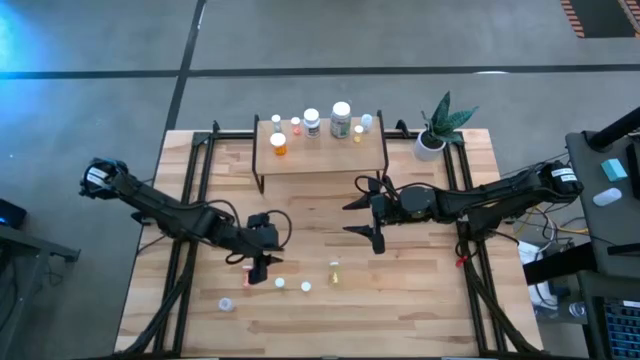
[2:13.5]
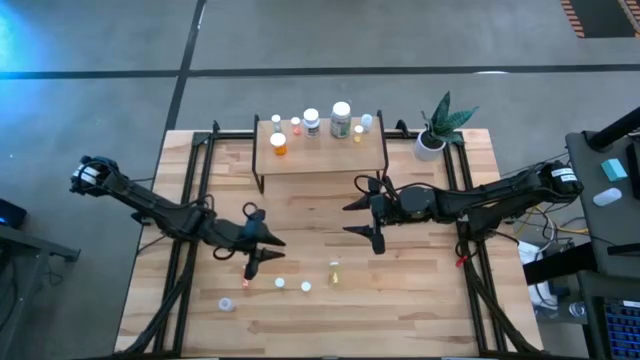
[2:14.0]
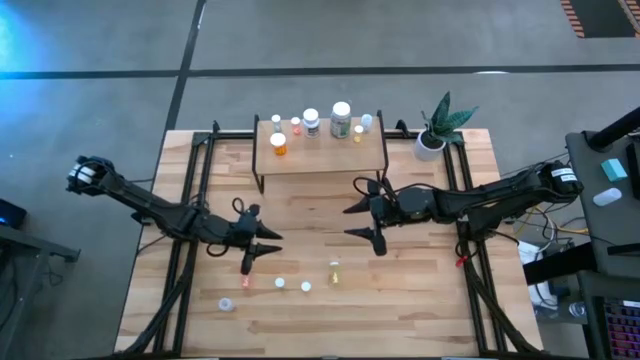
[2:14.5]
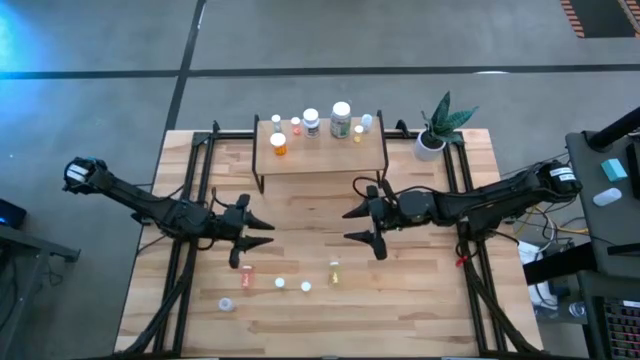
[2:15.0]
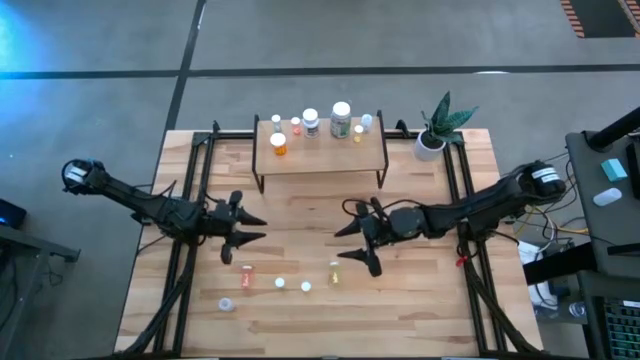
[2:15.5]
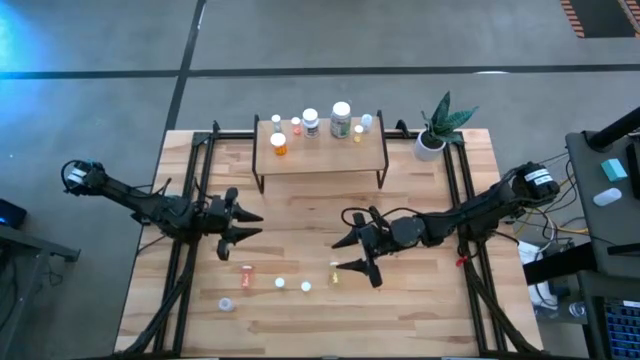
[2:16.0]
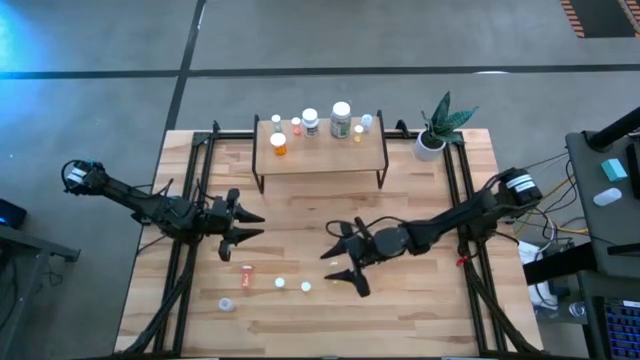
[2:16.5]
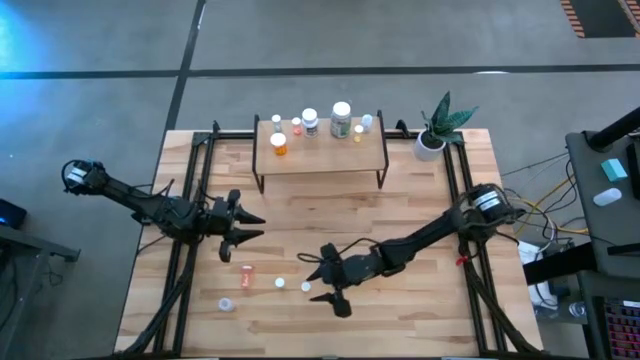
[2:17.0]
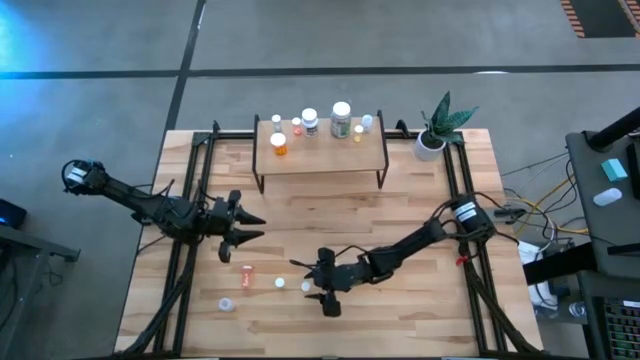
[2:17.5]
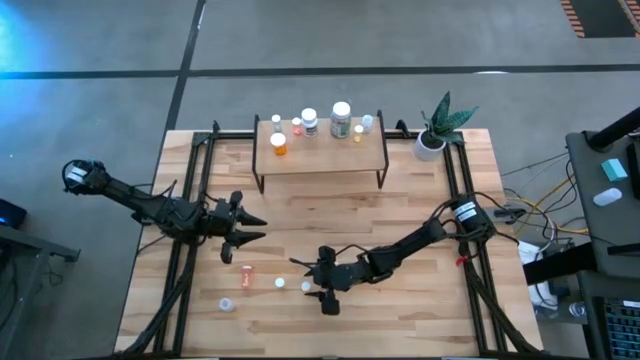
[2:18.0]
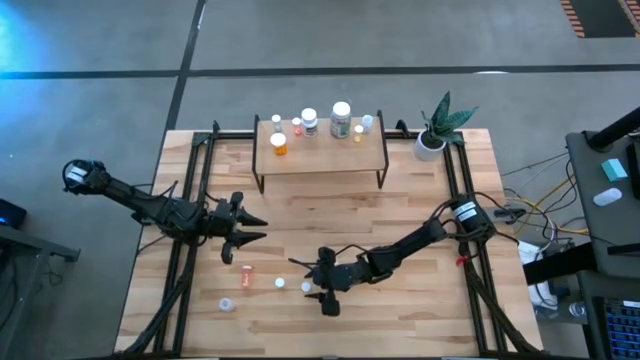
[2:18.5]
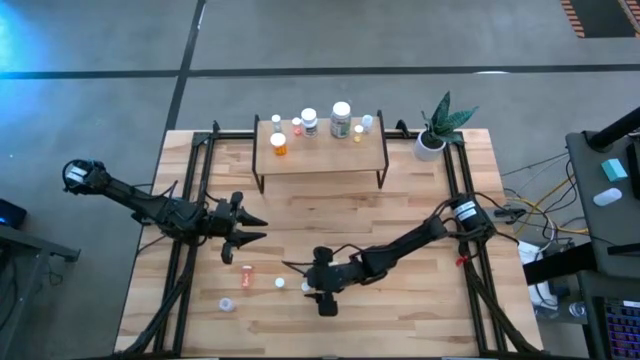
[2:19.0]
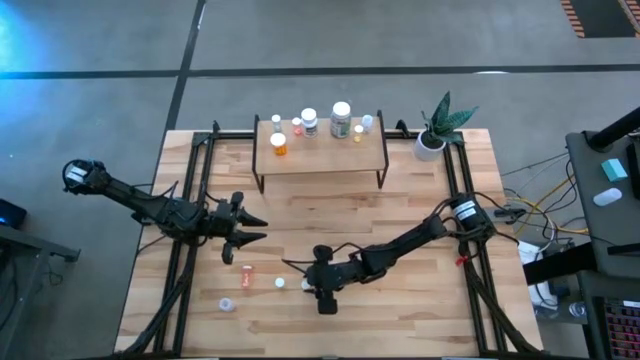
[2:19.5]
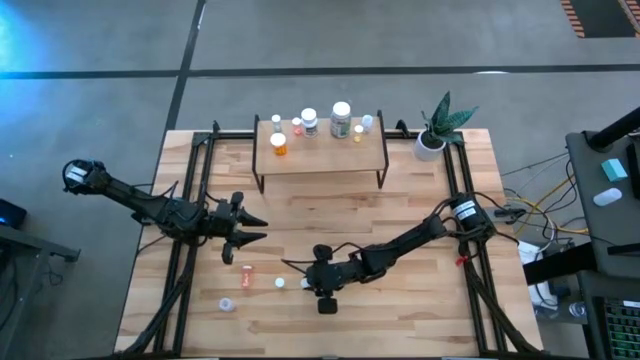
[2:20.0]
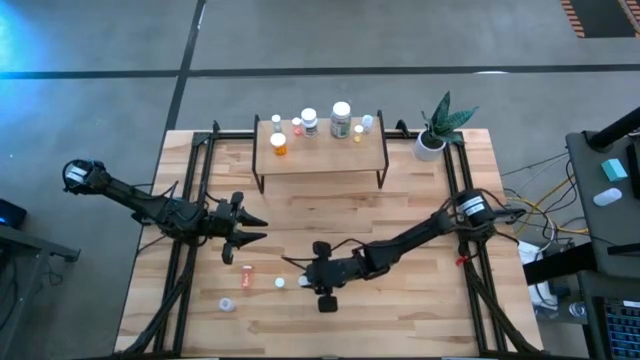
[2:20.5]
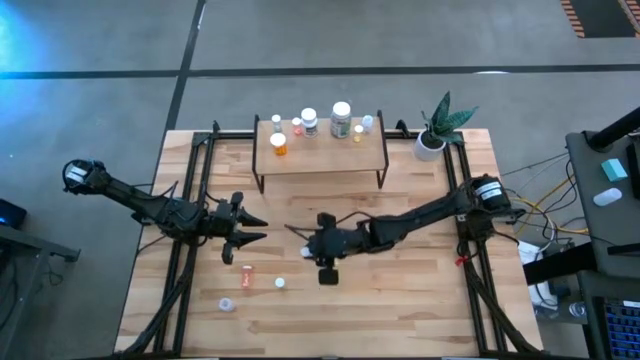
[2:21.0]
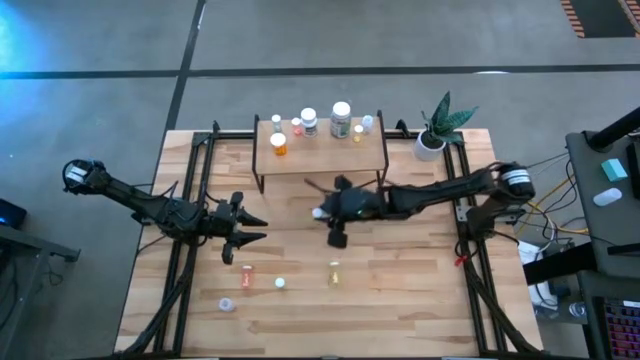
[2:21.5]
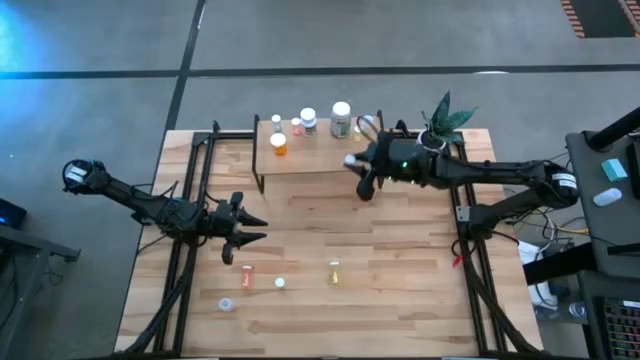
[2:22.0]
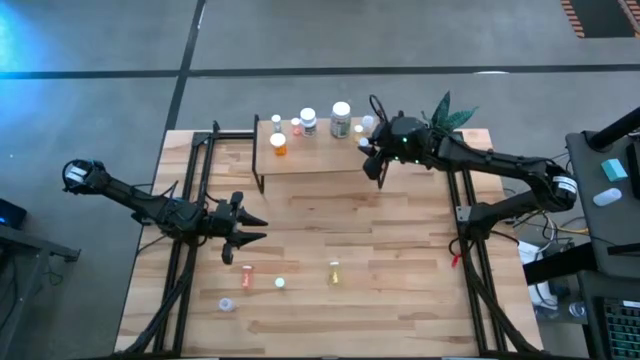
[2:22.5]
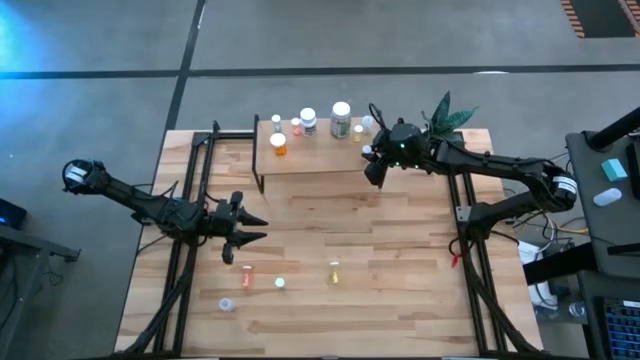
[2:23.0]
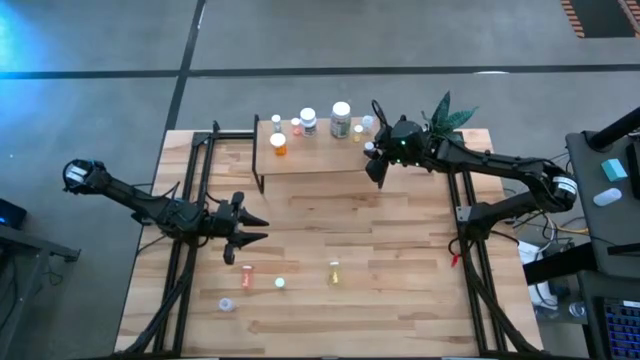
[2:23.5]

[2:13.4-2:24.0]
Task: Pick and place medicine bottles onto shelf by color
Put the middle yellow medicine bottle on the shelf

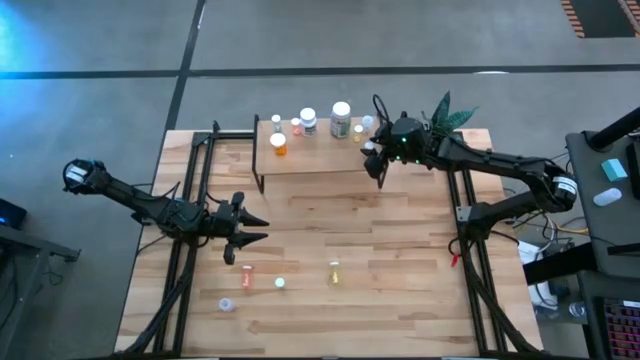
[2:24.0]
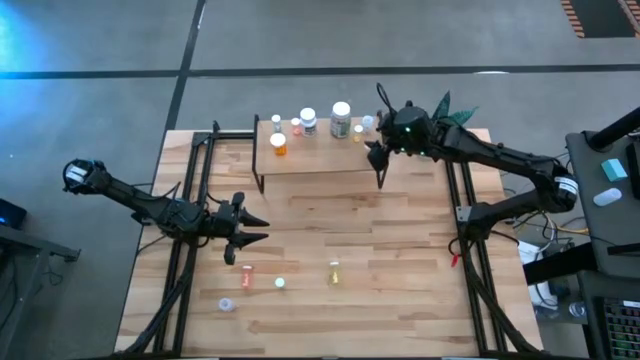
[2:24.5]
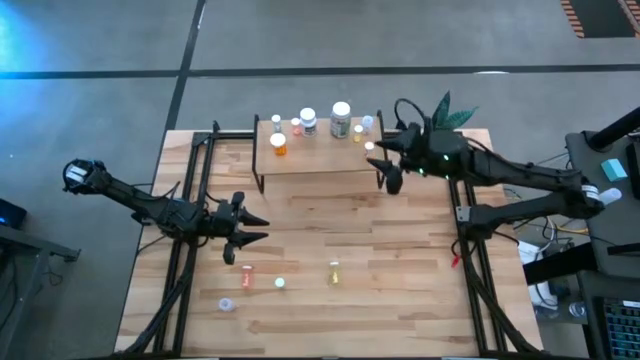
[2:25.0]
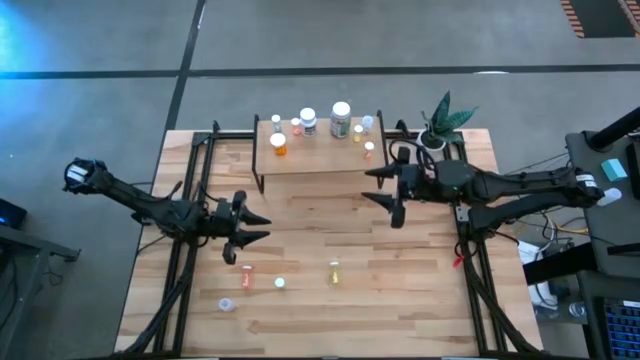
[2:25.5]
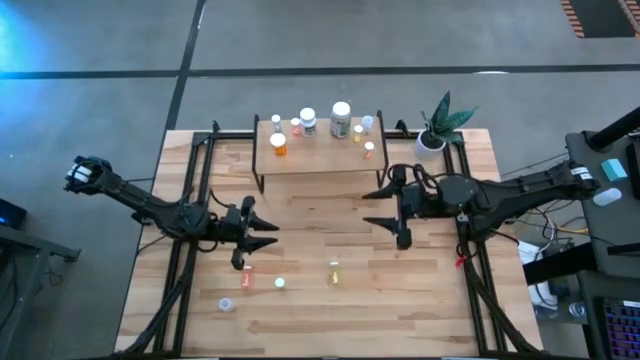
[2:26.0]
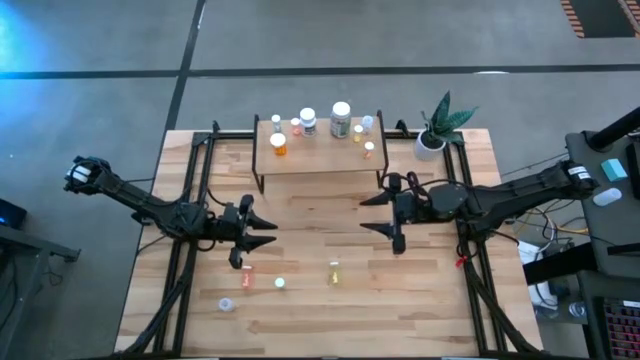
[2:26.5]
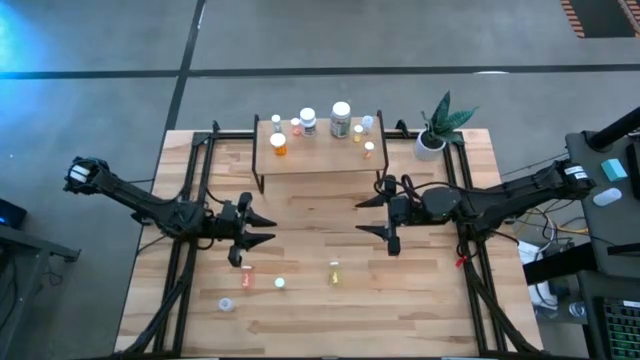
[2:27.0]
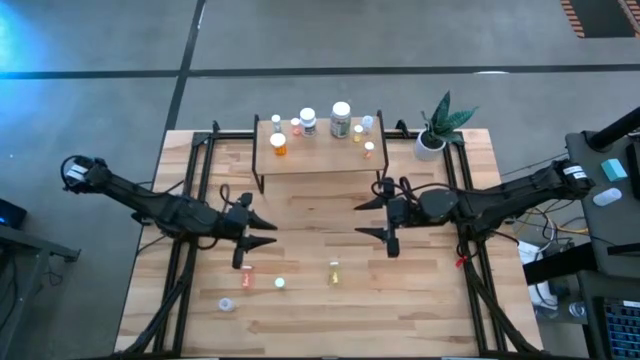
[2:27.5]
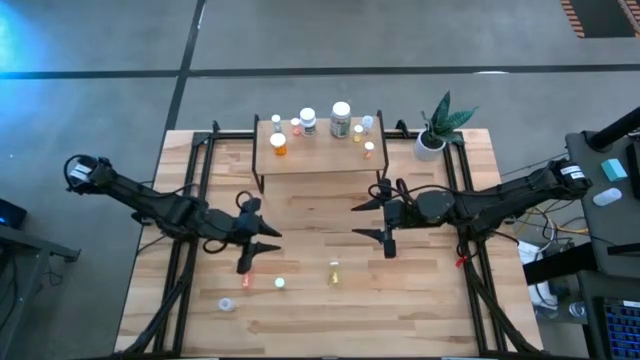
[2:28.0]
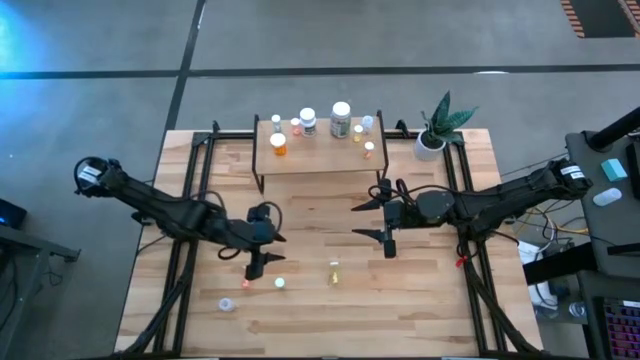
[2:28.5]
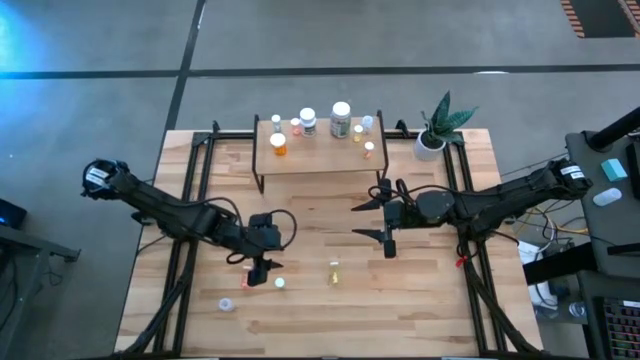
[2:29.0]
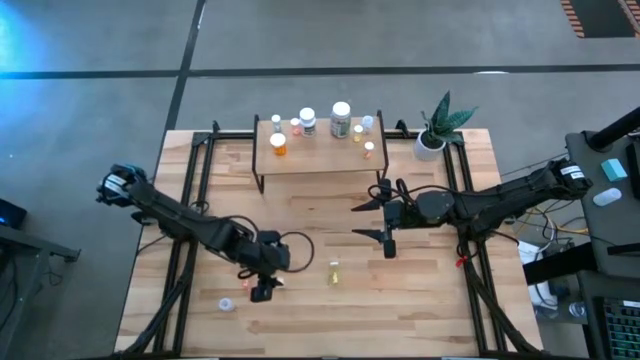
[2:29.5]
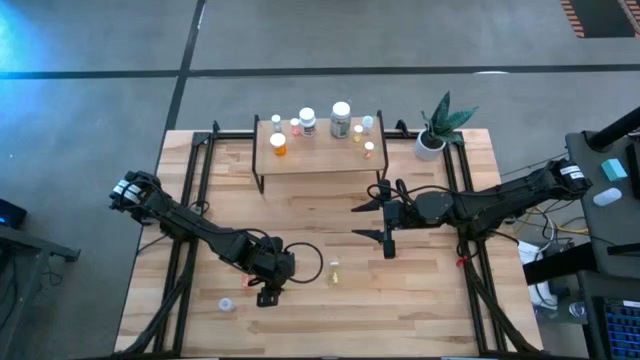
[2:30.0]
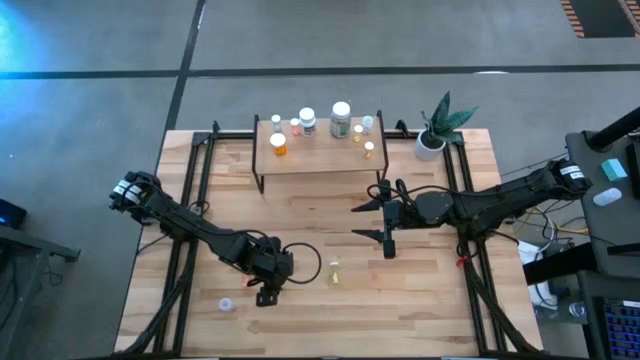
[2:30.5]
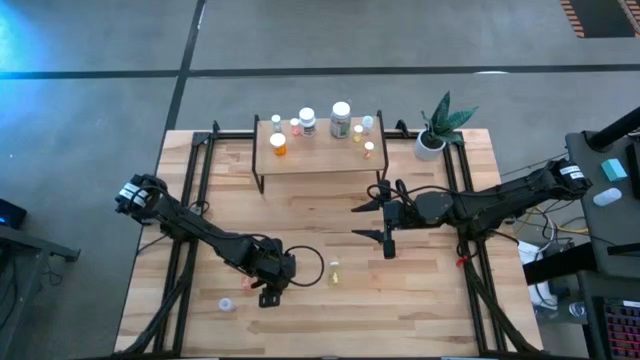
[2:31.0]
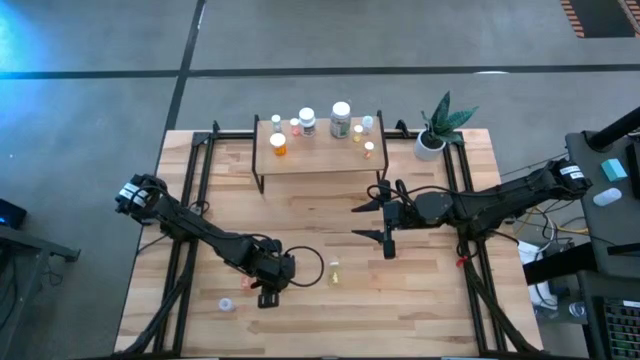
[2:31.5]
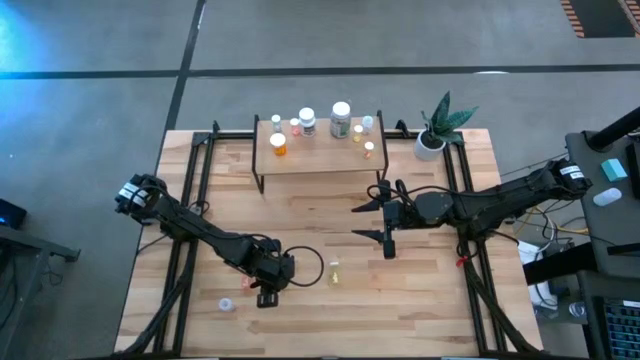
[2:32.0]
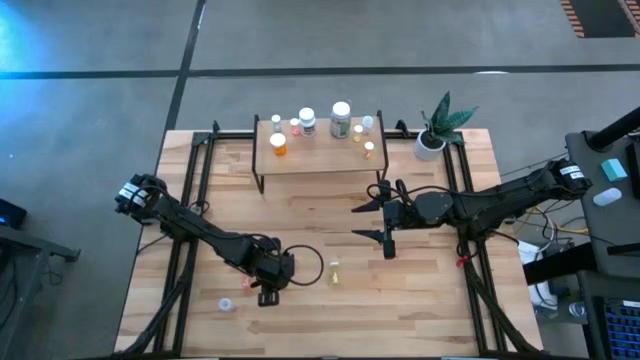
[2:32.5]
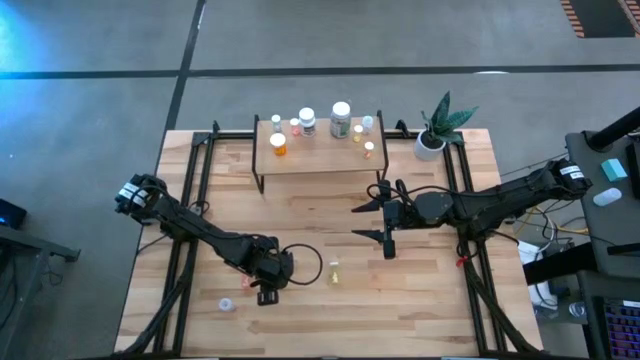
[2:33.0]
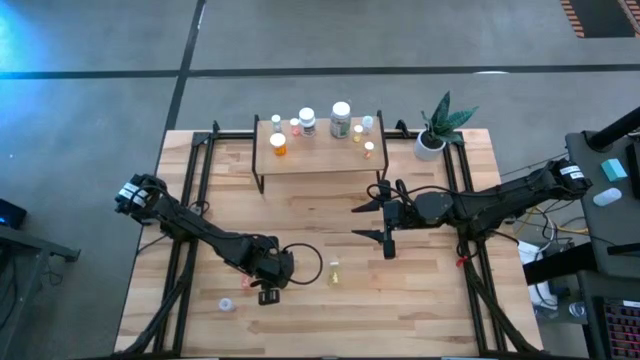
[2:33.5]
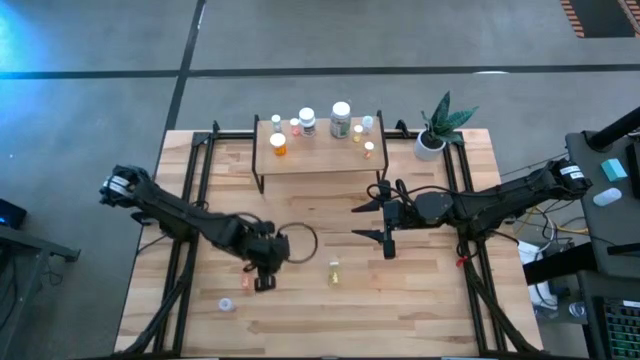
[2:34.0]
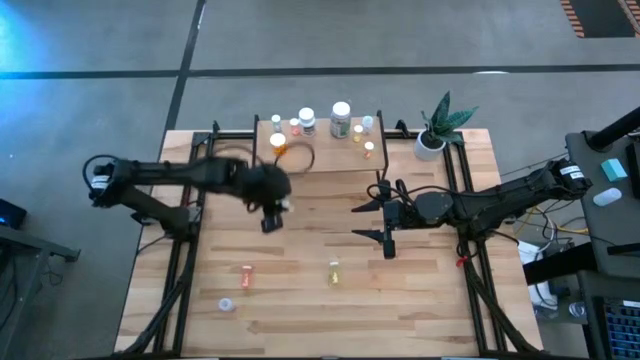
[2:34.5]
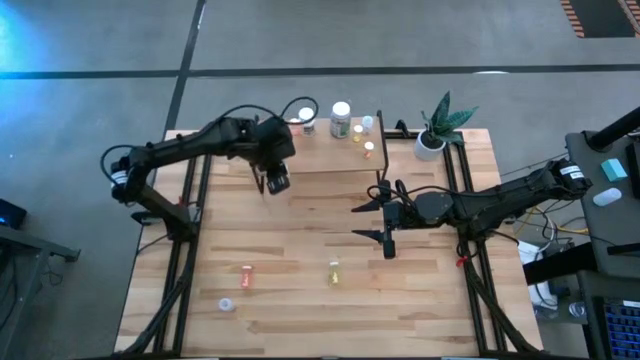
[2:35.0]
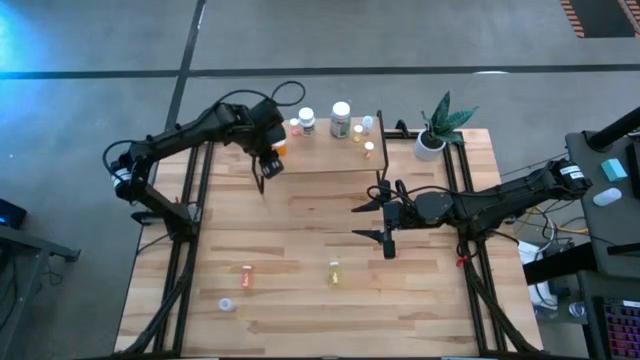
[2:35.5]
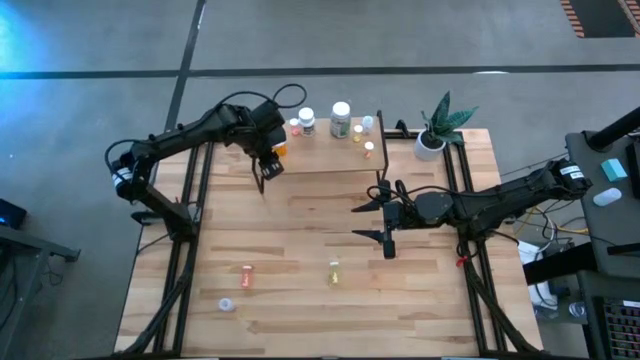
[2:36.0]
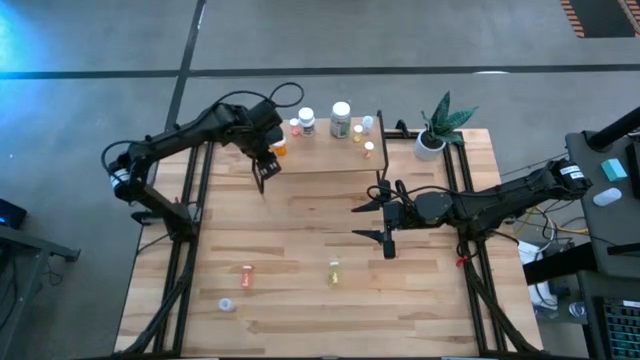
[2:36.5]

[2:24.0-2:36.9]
Put the left yellow medicine bottle on the shelf
